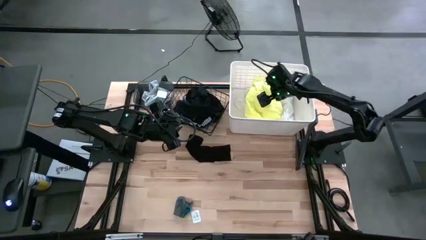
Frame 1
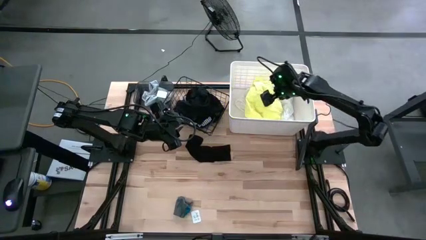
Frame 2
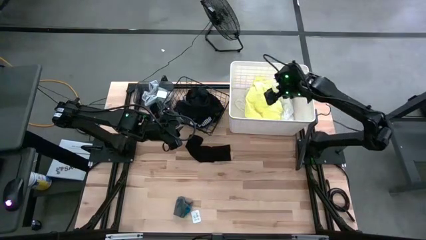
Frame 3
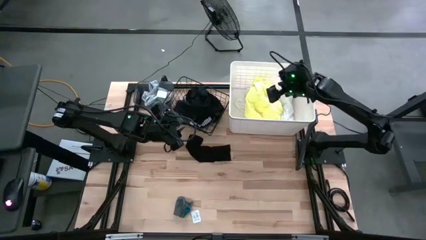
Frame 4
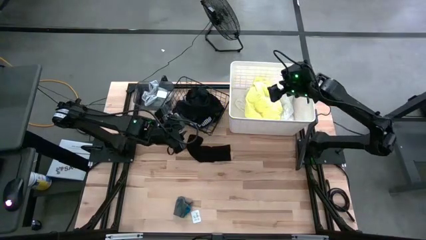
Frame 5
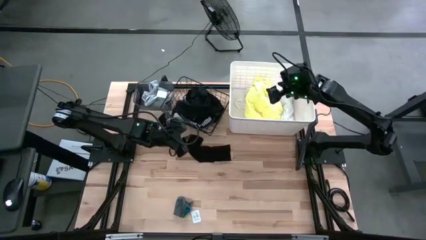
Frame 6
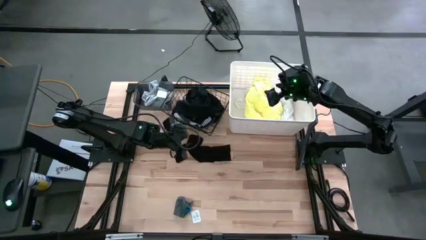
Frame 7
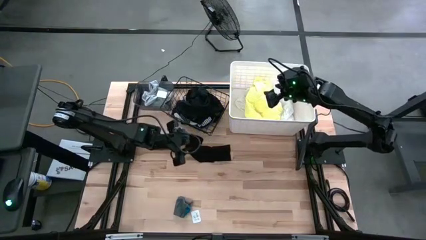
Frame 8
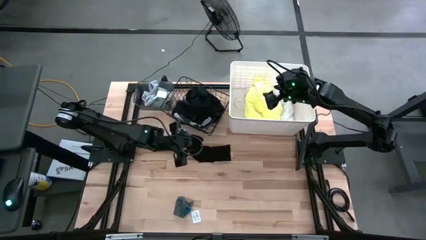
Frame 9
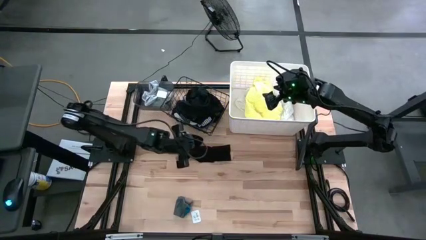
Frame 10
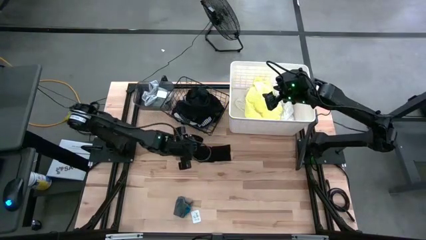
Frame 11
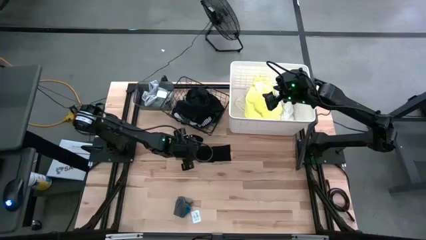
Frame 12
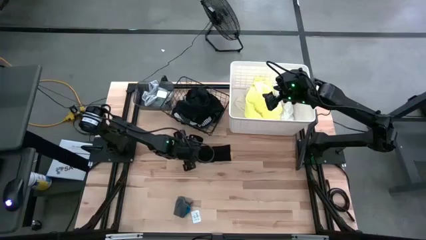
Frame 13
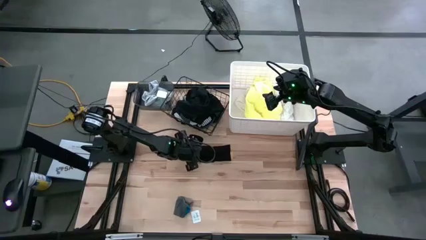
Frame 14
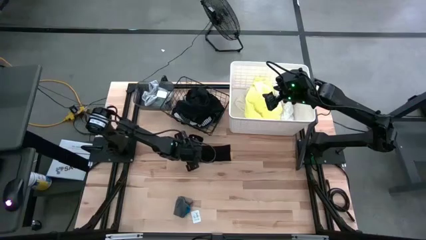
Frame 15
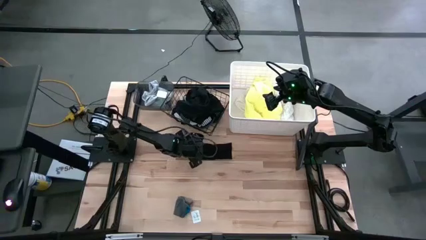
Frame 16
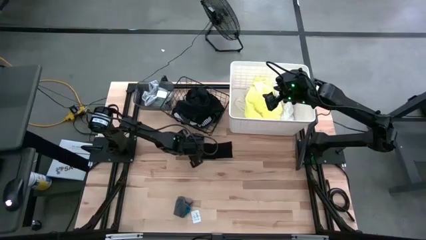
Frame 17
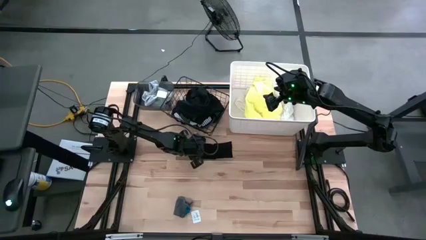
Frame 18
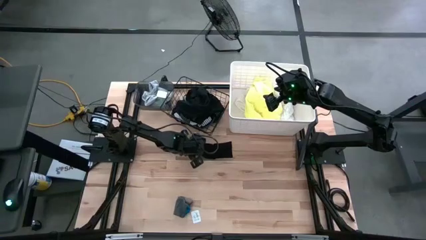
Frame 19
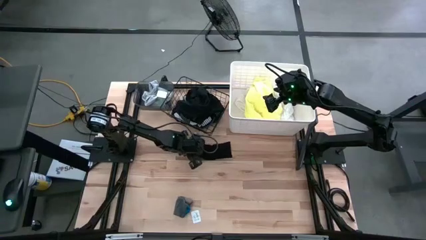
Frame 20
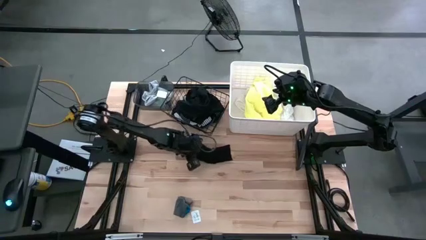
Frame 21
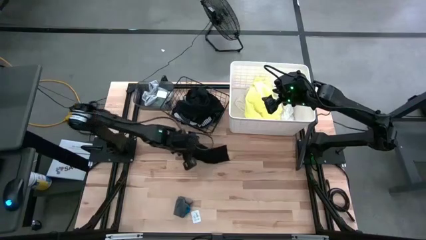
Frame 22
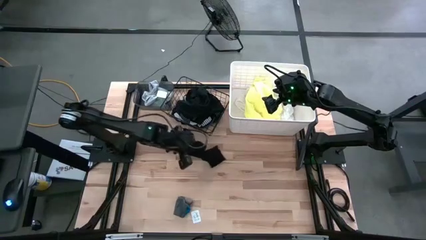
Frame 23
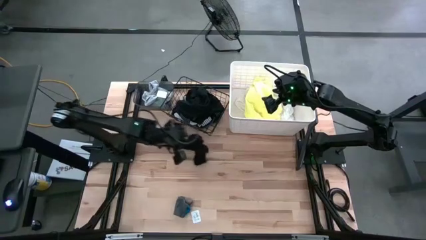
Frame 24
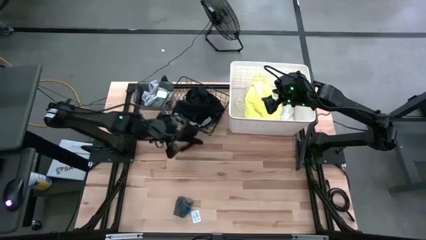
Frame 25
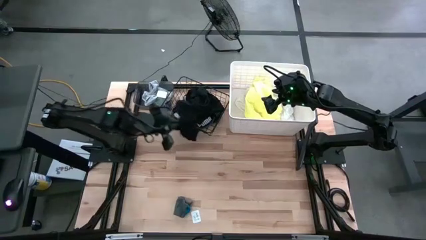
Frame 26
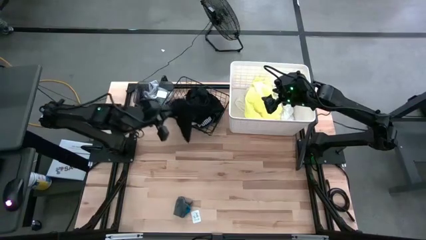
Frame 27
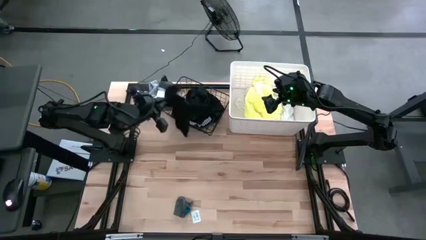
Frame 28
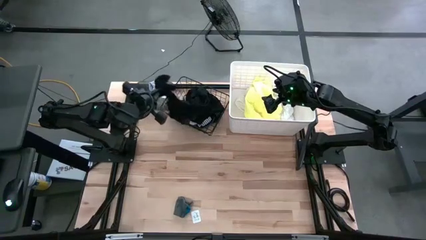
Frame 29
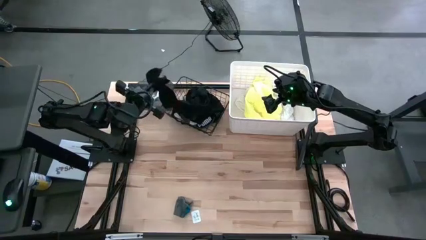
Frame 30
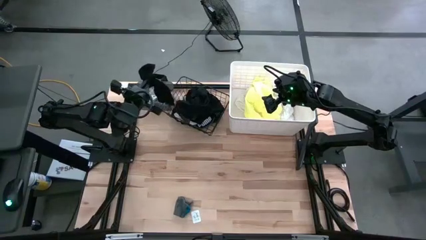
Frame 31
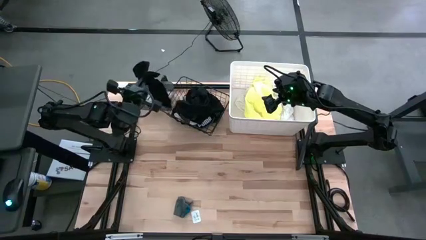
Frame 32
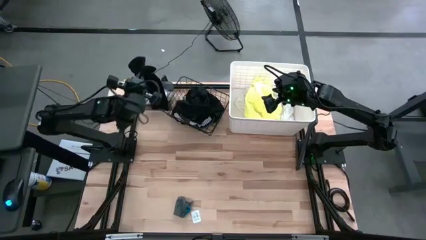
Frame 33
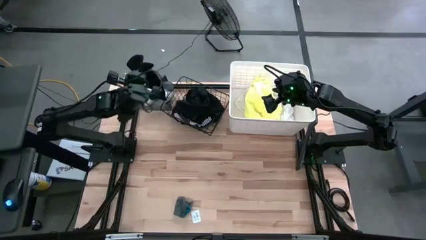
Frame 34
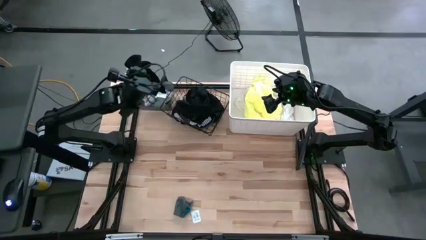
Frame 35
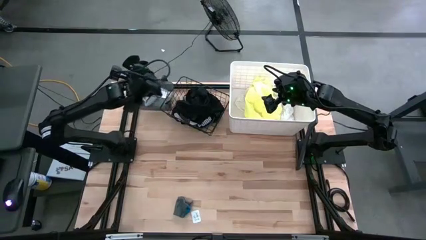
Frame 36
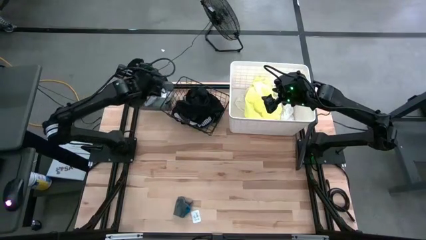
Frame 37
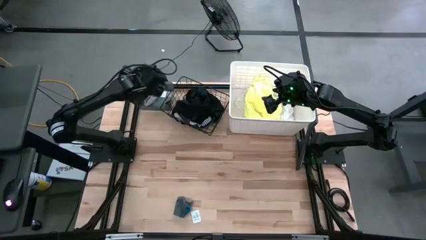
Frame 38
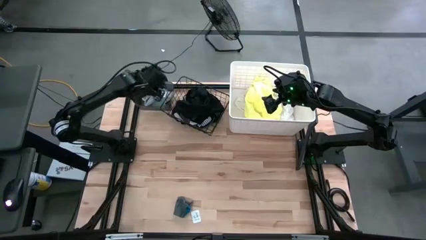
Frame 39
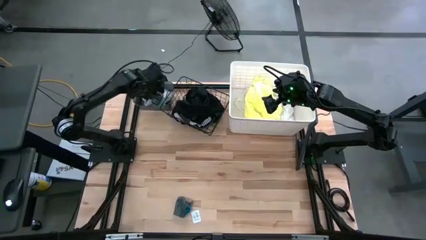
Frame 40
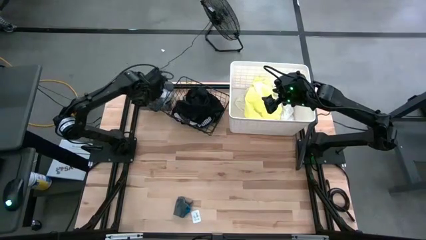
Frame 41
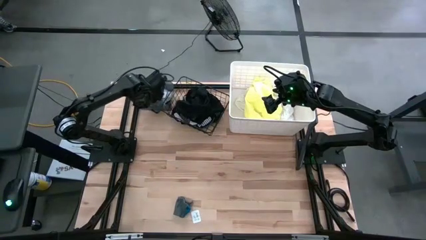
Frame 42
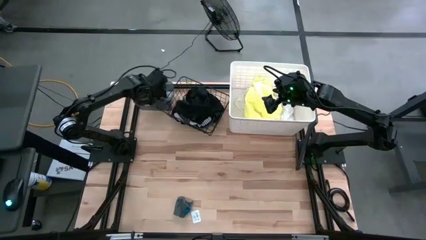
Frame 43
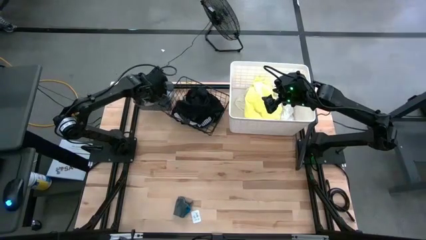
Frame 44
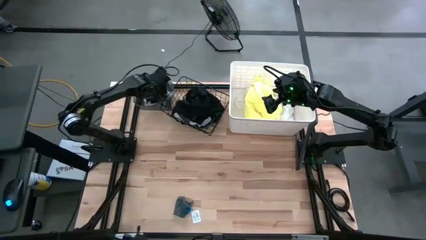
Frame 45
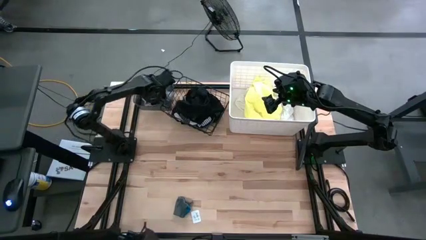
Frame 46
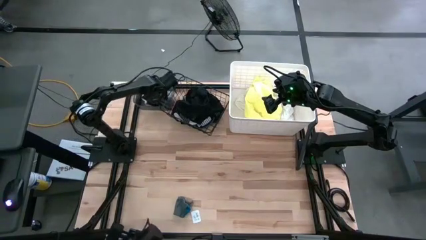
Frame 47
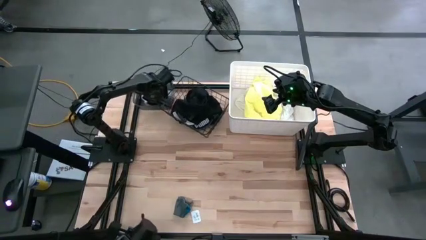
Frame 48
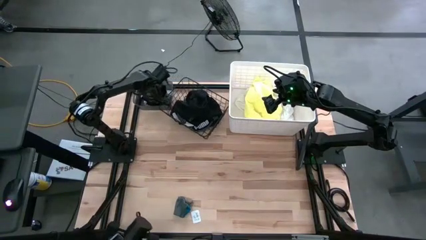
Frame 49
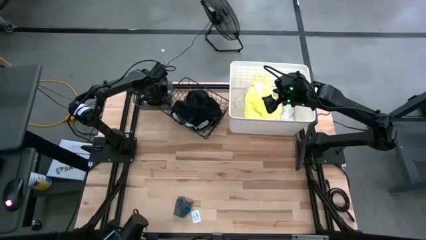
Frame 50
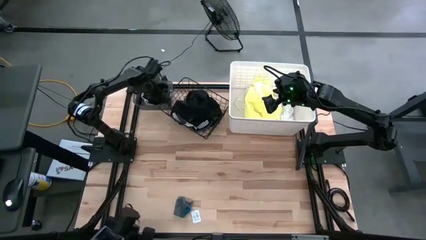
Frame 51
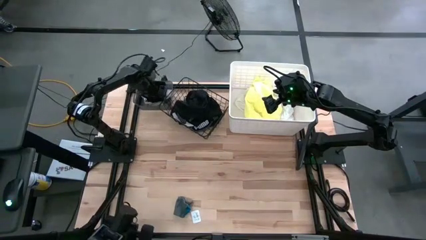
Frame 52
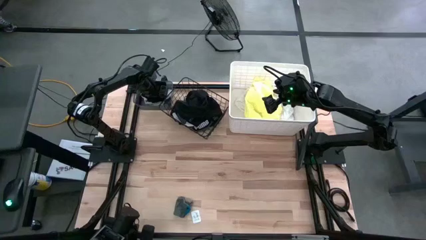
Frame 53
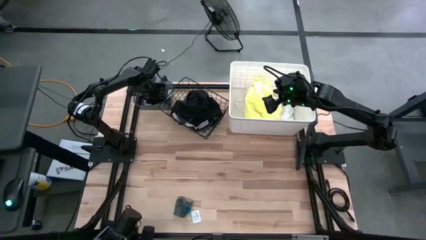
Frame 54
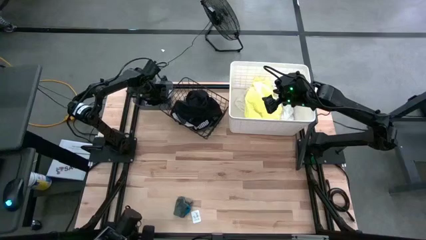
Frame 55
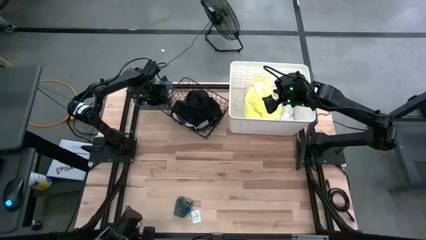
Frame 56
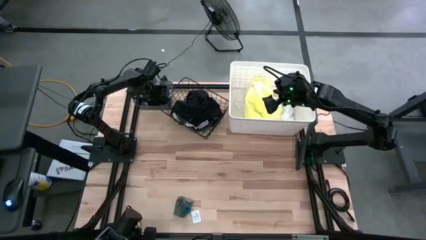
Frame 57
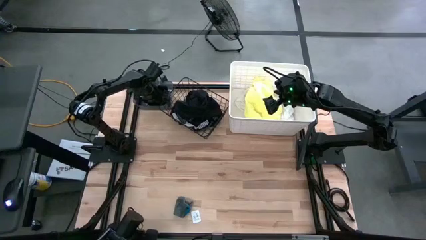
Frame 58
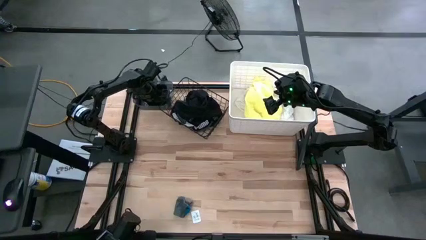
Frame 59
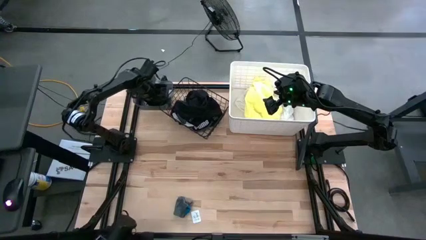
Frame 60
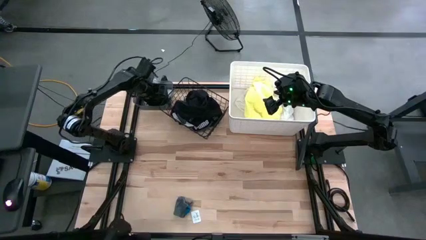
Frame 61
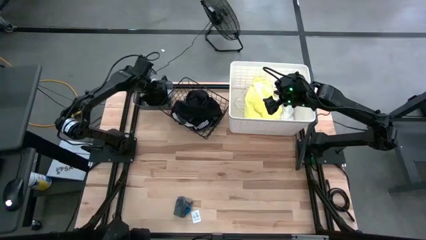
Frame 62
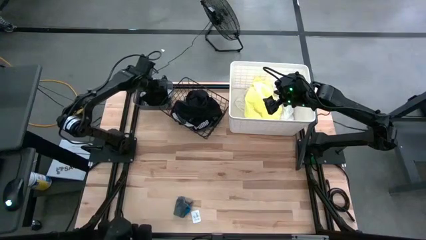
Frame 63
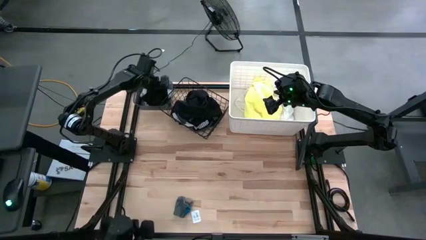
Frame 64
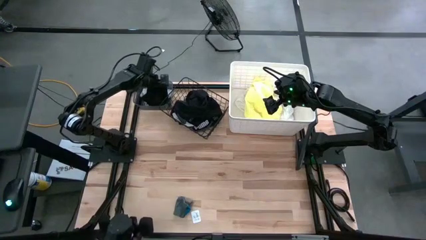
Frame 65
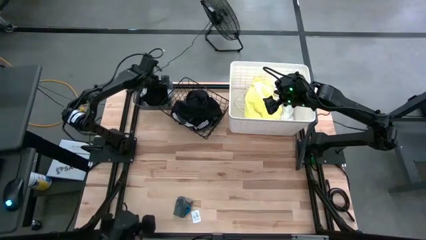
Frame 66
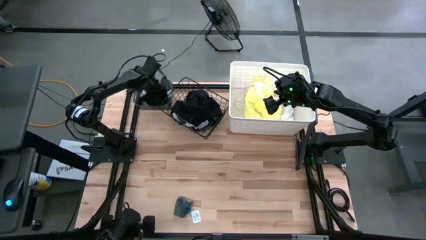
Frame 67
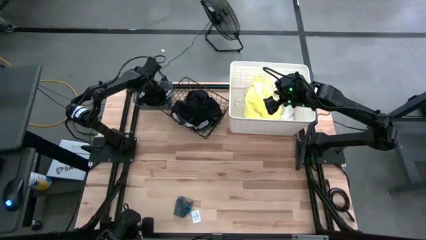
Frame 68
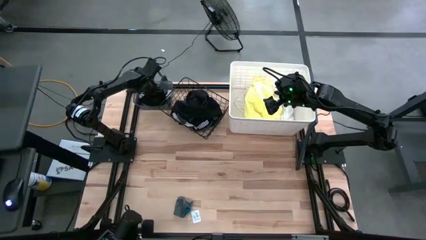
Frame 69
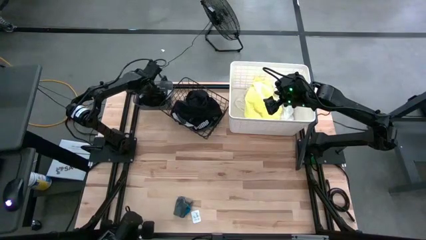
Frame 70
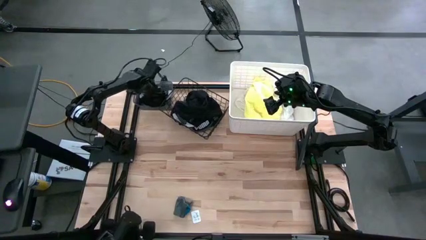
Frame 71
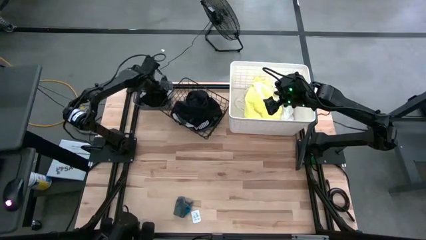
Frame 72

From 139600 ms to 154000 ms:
Task: Pick & Place Cloths
Put the black sock into the black bin

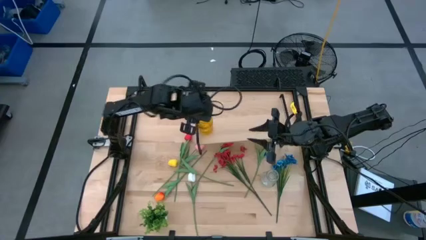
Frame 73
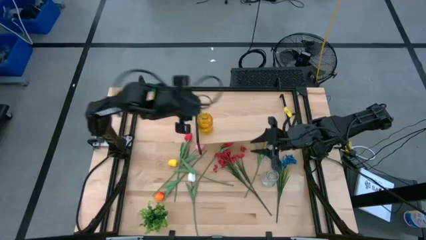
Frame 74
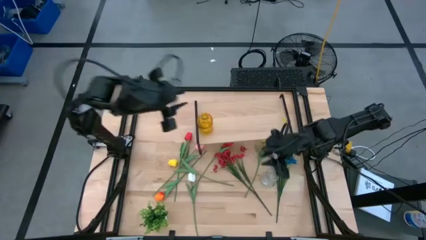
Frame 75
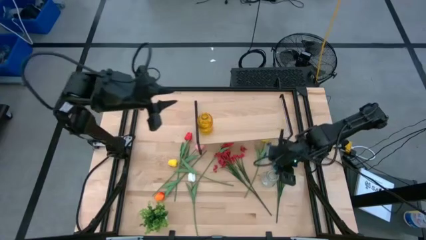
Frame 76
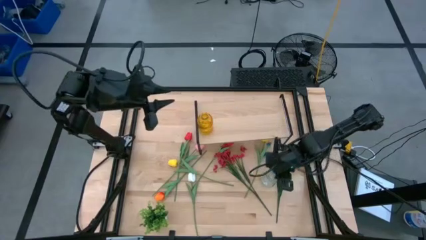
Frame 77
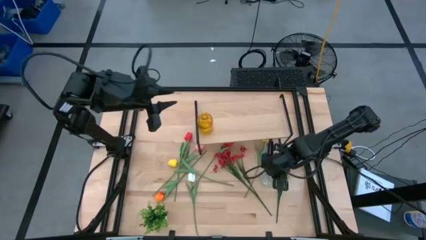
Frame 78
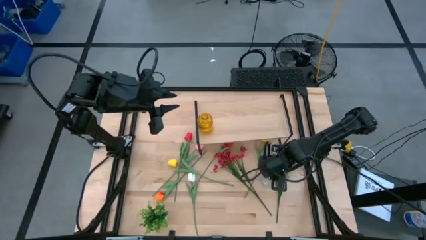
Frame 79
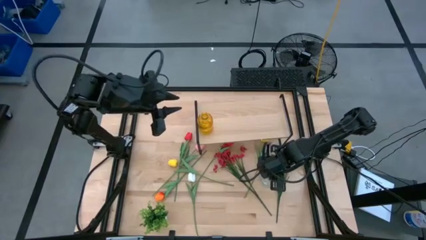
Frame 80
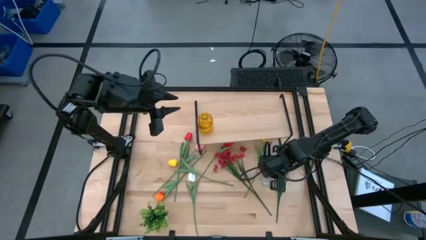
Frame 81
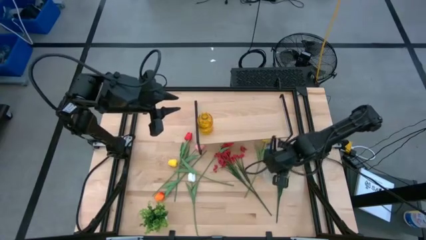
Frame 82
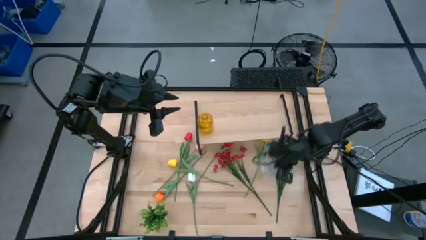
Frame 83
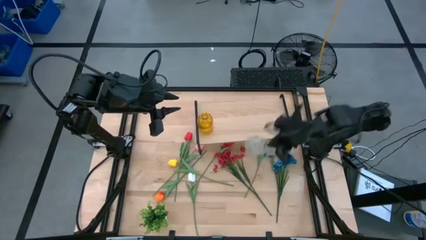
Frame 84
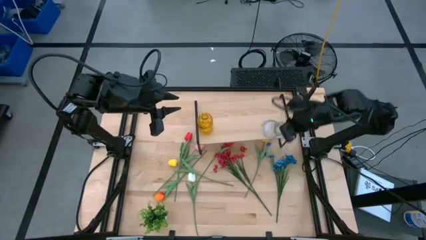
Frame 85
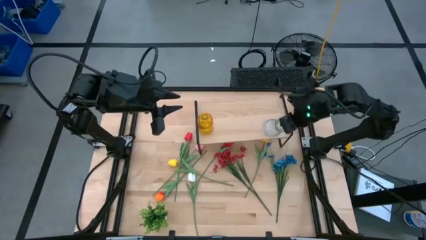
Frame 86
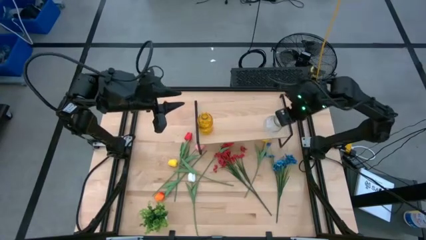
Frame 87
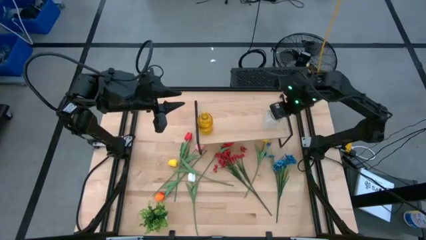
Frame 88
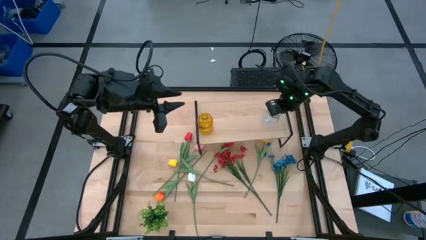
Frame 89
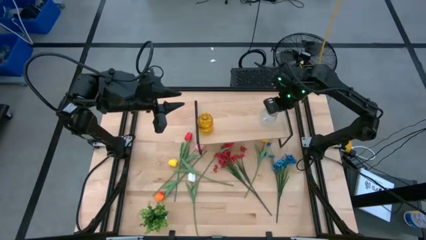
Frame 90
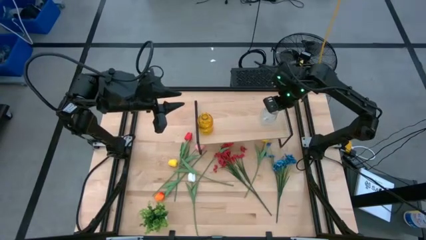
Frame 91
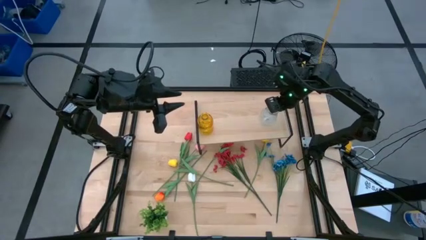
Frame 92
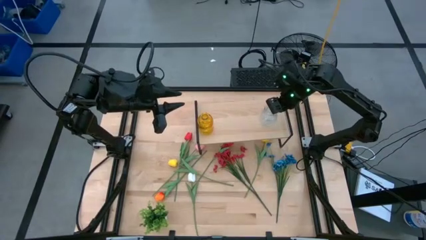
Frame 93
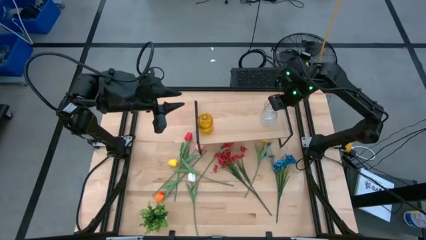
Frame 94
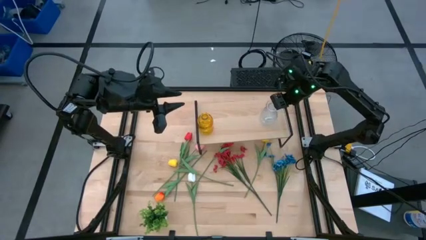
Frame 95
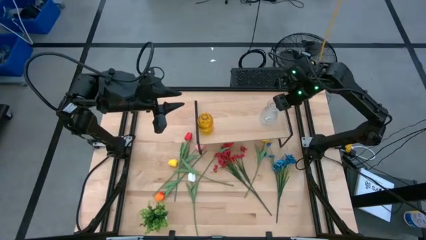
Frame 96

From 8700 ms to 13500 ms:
Task: Pick and place flowers into a vace then onto a shelf
Put the transparent vase on the shelf
